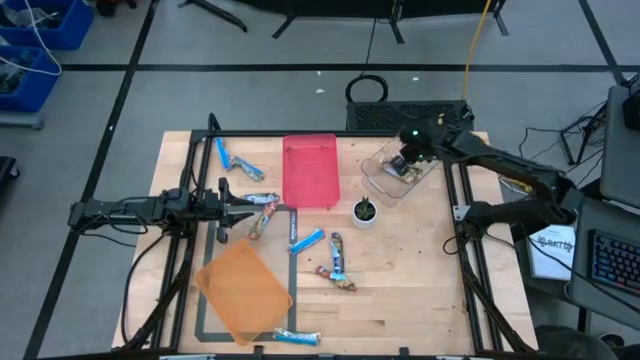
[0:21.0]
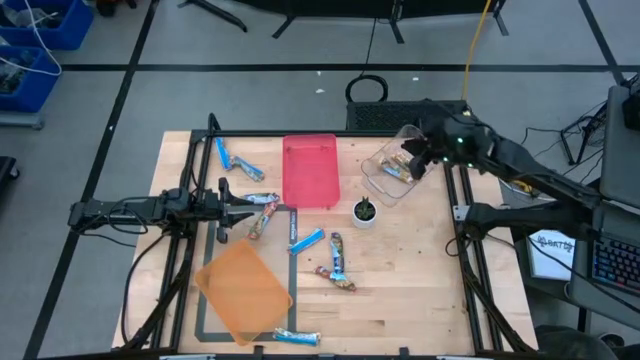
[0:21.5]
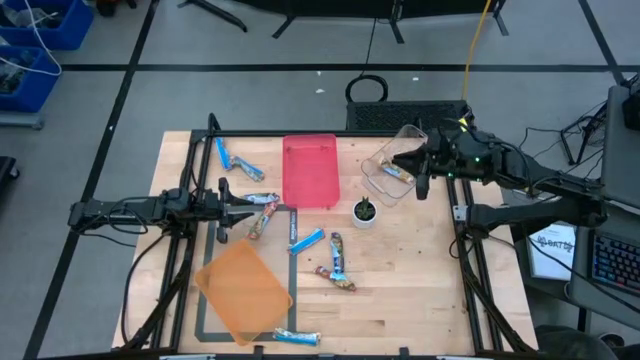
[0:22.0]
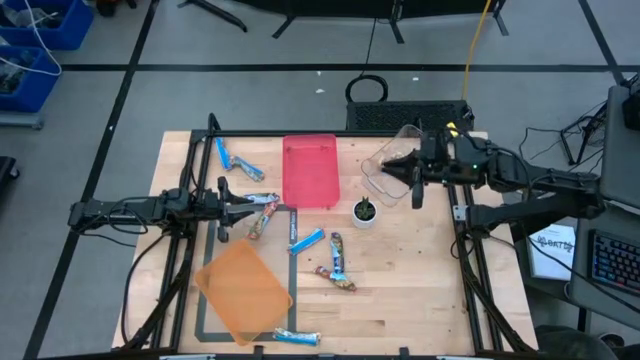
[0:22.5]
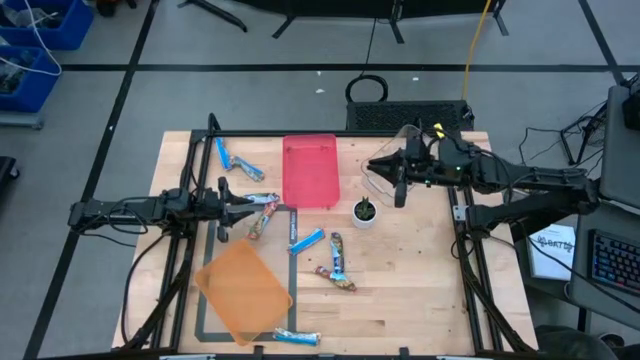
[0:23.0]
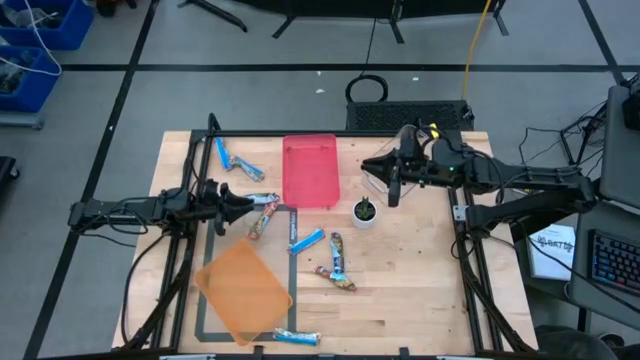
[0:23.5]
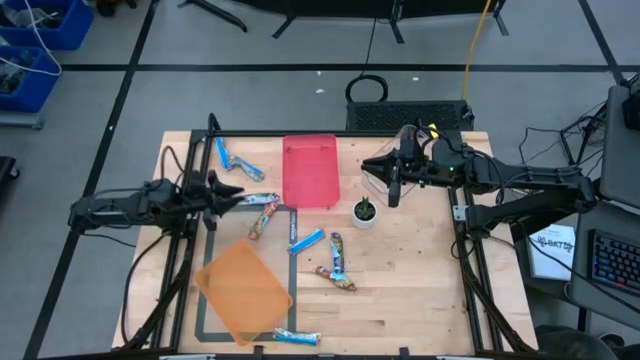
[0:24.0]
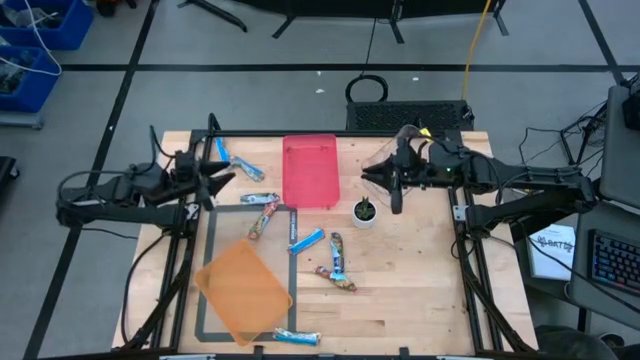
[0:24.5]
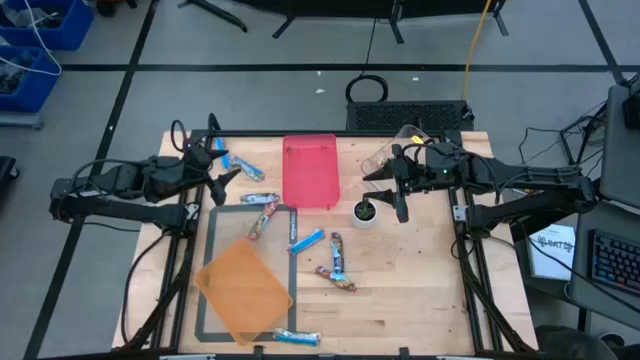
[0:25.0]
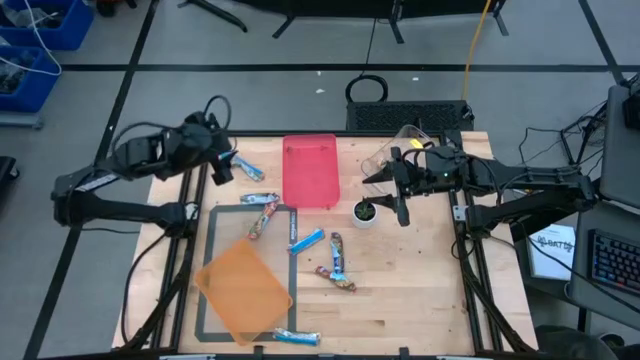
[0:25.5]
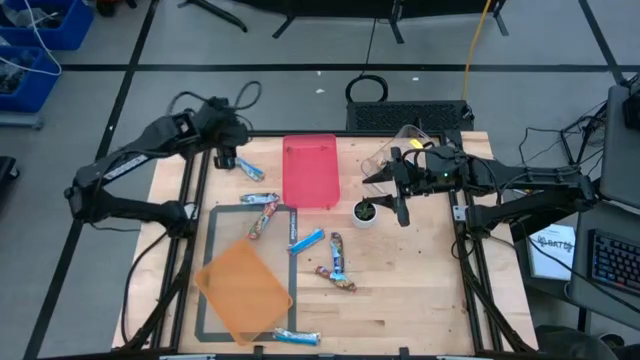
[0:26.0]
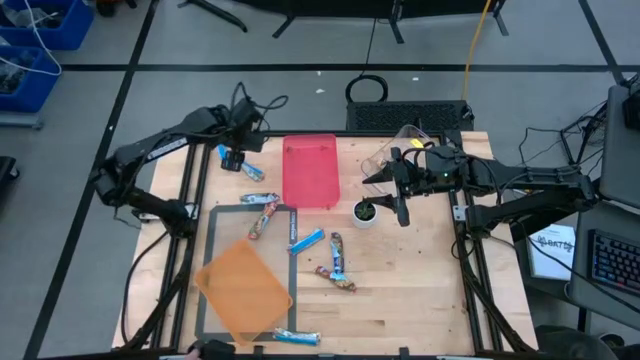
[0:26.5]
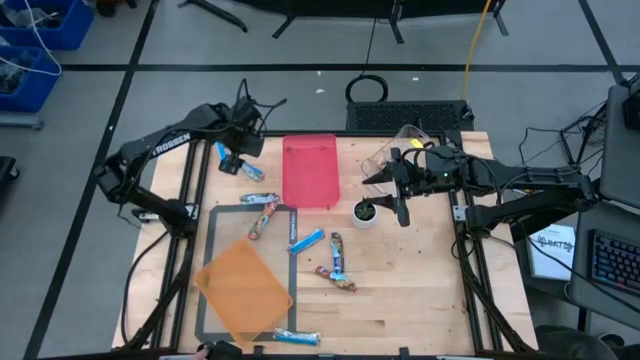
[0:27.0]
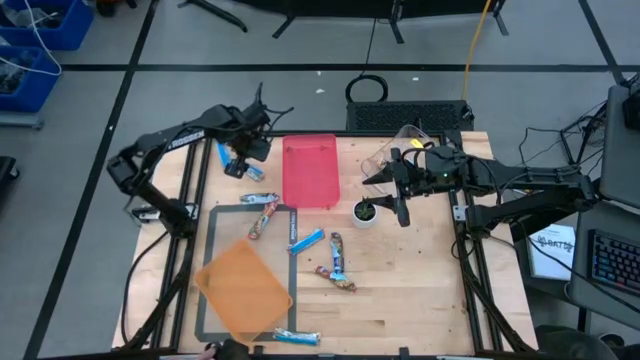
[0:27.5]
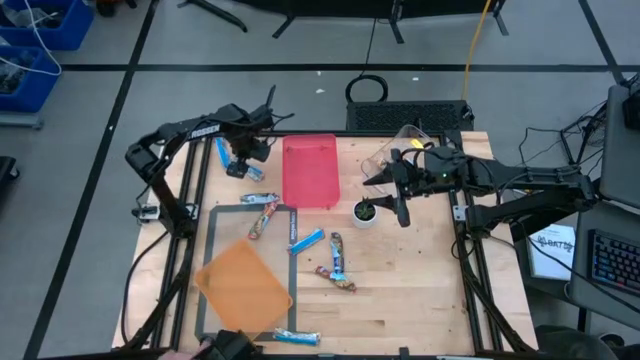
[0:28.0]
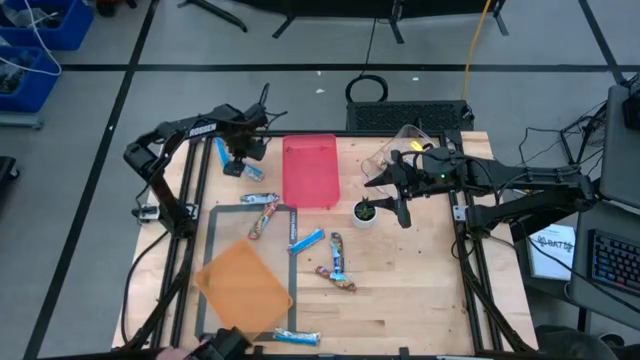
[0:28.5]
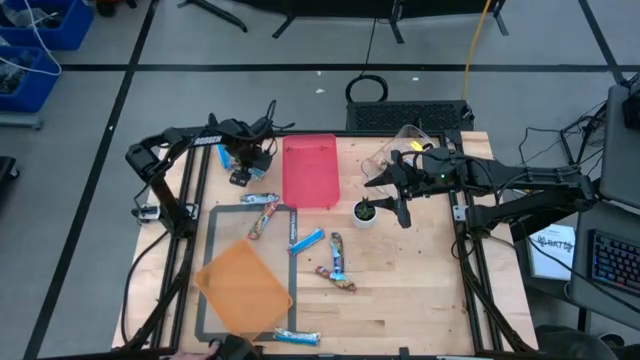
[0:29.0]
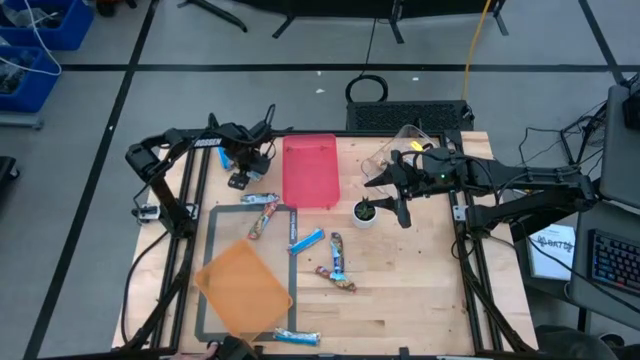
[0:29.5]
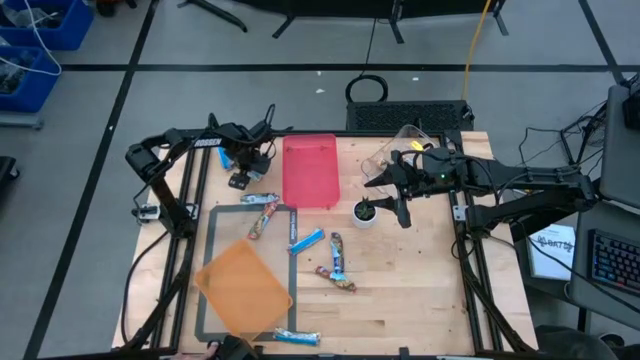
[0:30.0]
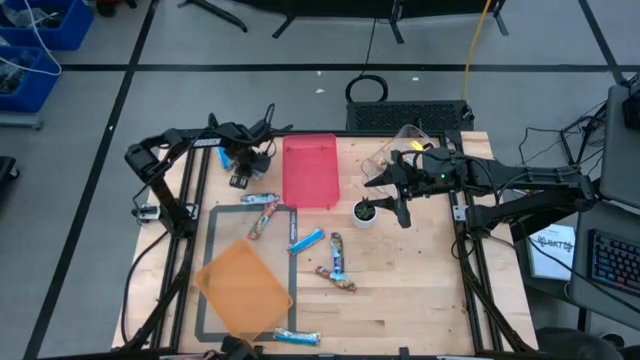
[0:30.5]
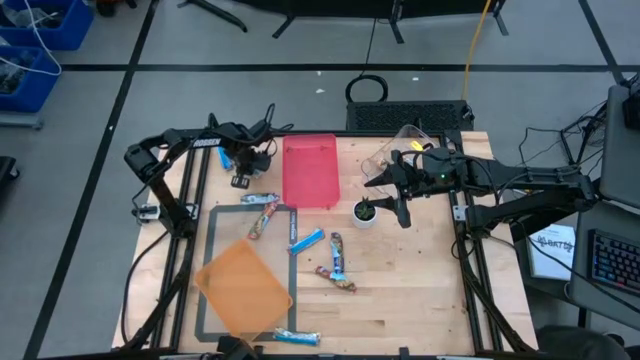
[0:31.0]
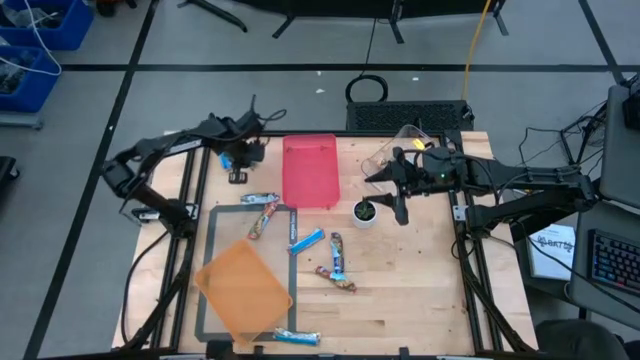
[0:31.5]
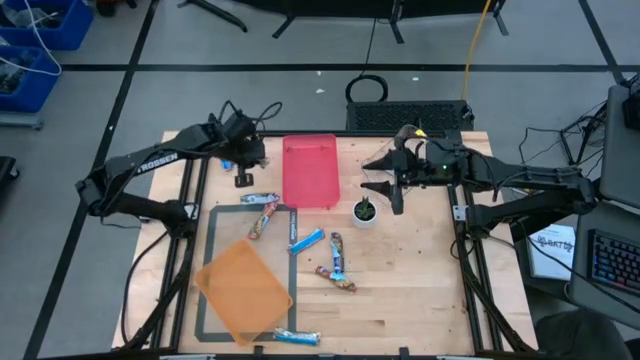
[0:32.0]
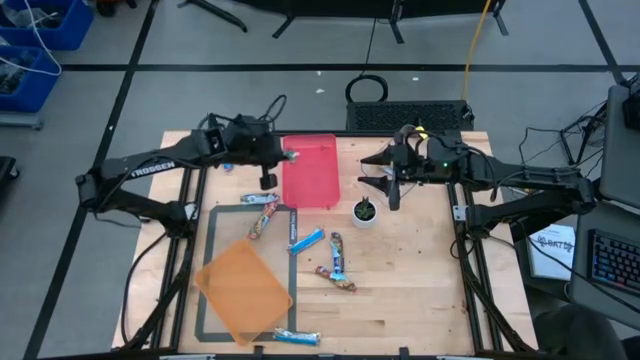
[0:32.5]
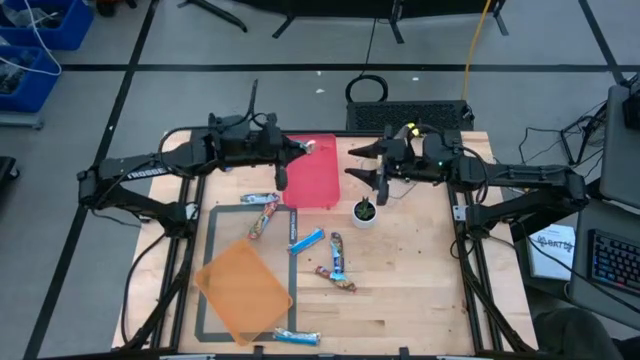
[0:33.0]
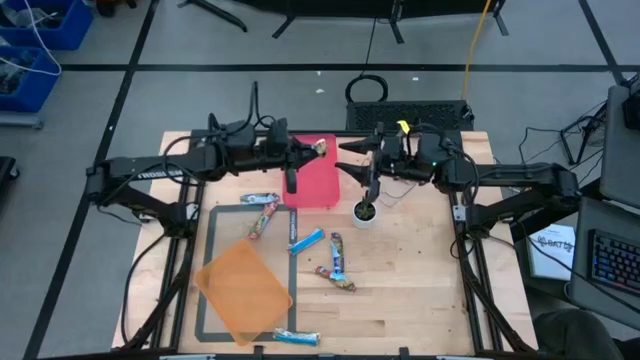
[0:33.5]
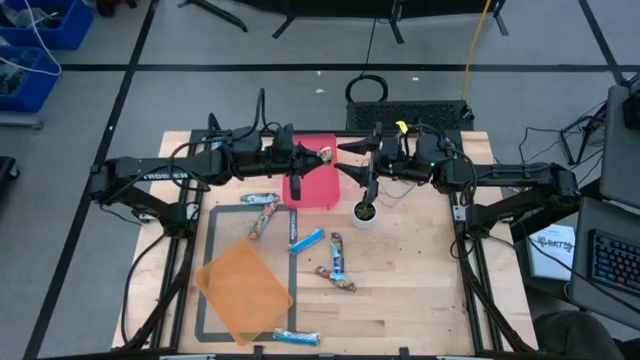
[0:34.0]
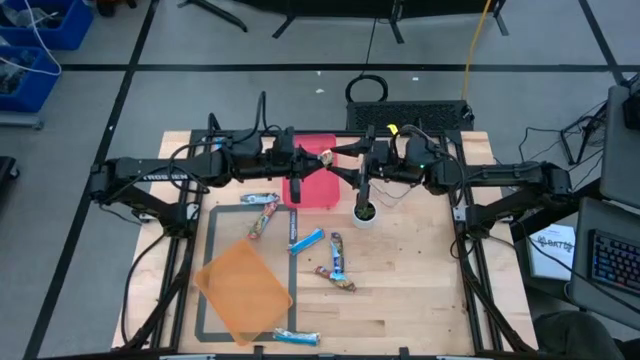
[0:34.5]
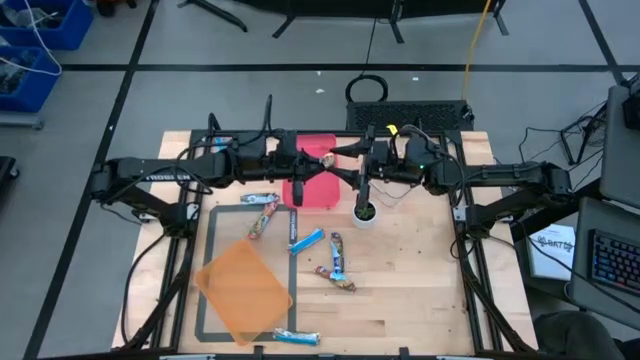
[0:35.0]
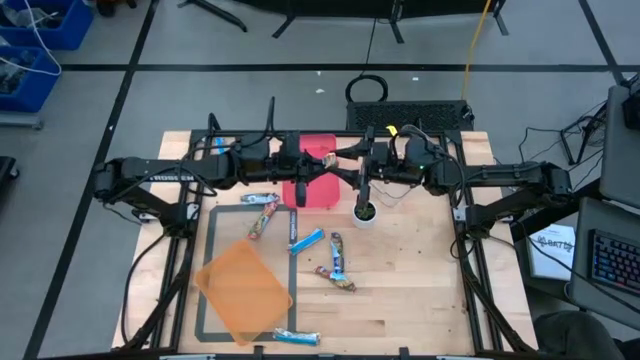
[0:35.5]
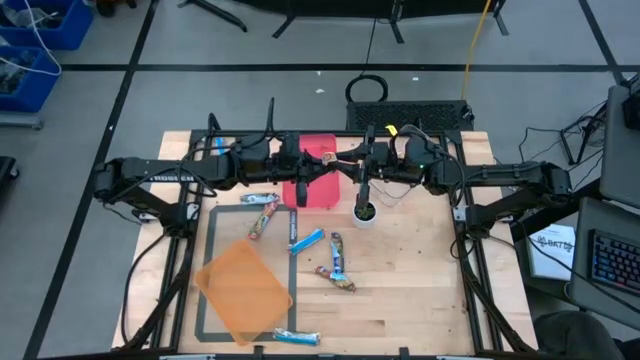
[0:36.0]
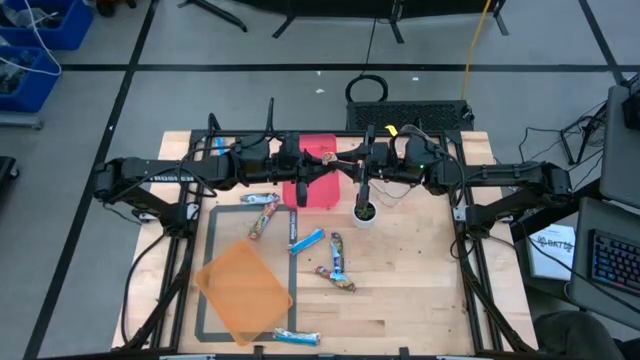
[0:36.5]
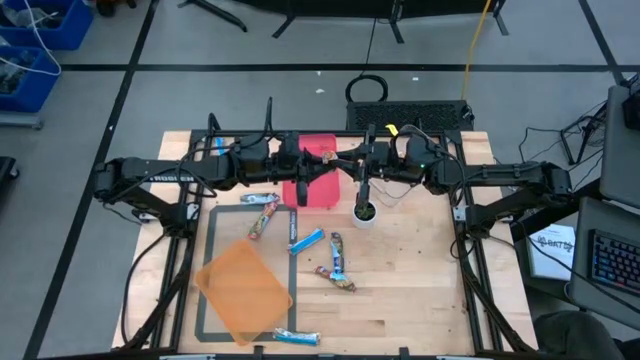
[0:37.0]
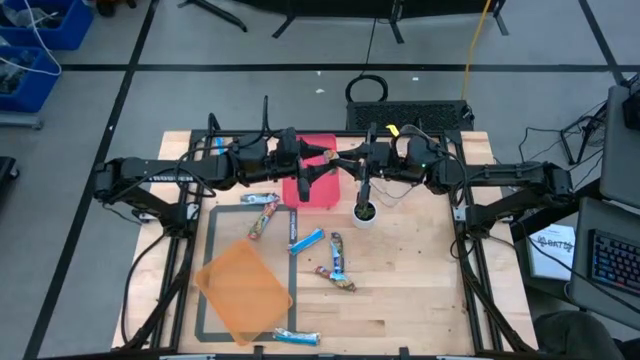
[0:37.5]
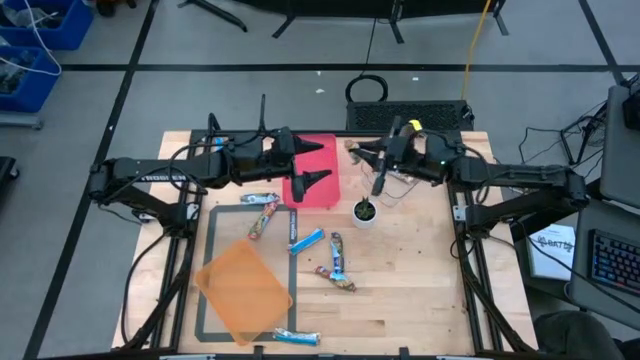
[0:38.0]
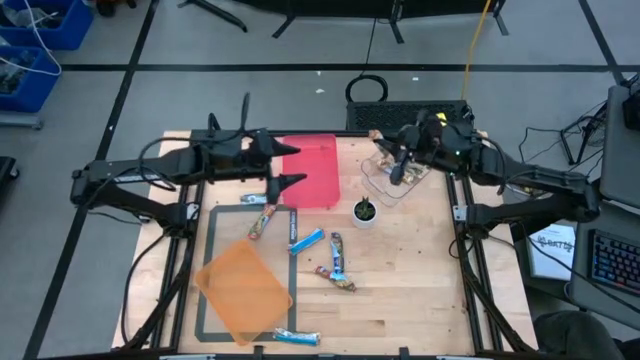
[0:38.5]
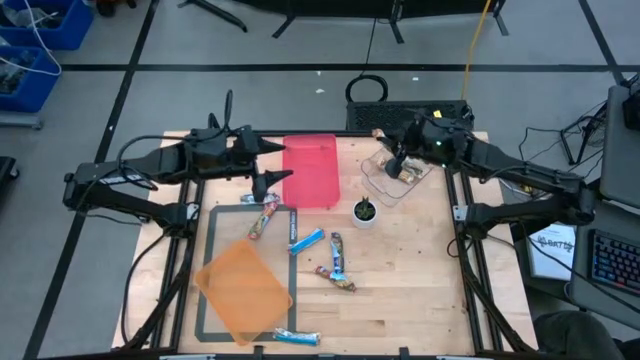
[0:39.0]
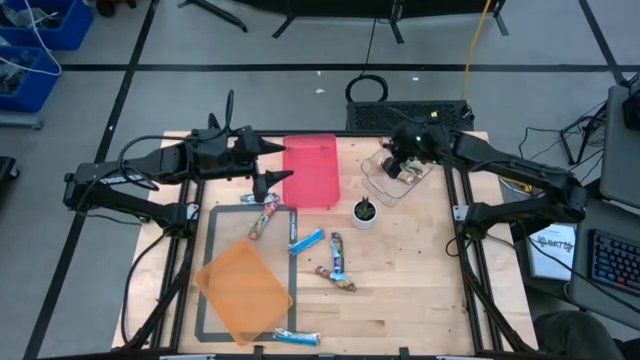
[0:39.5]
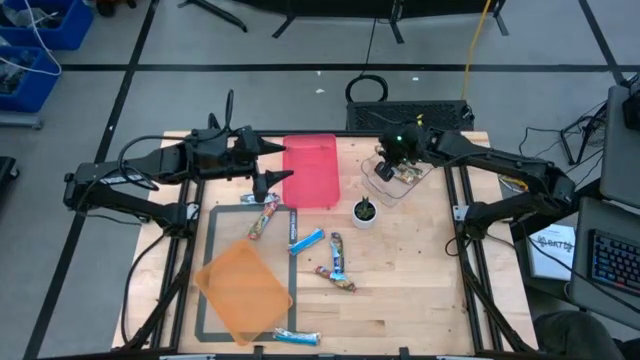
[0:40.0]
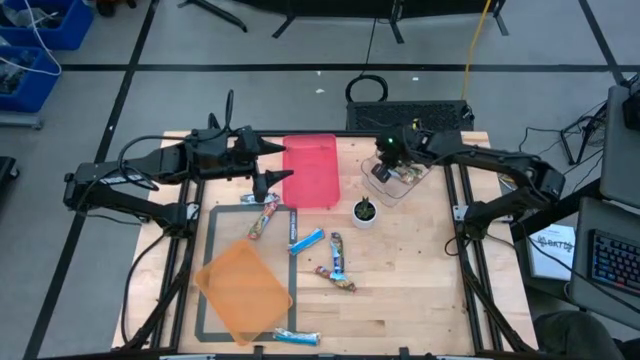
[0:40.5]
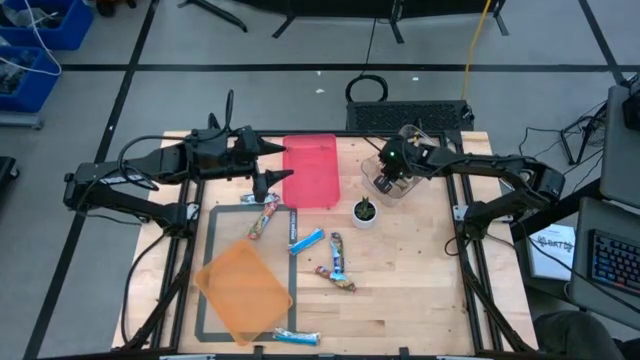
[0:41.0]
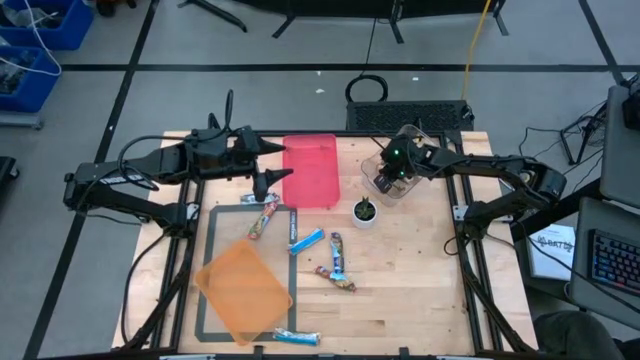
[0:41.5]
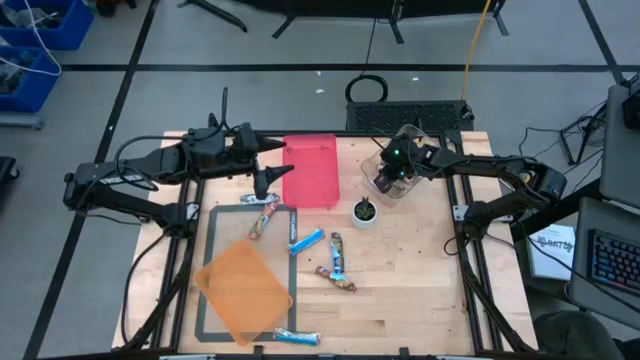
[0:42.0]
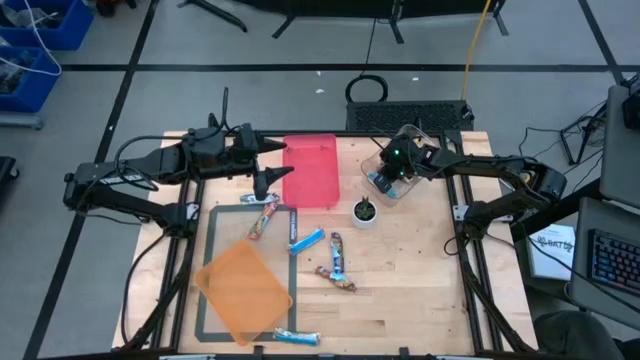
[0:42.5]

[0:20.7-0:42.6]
Task: Pick and place Granola Bars by type
Put the orange granola bar into the transparent bin
